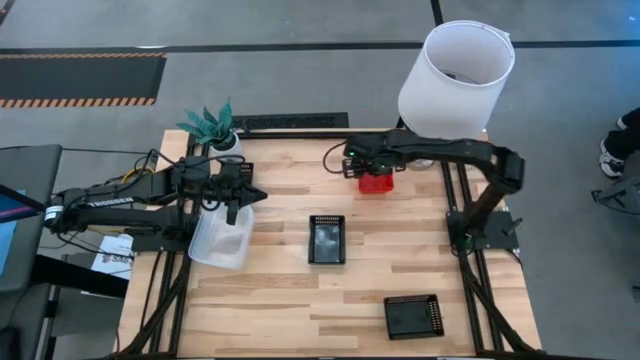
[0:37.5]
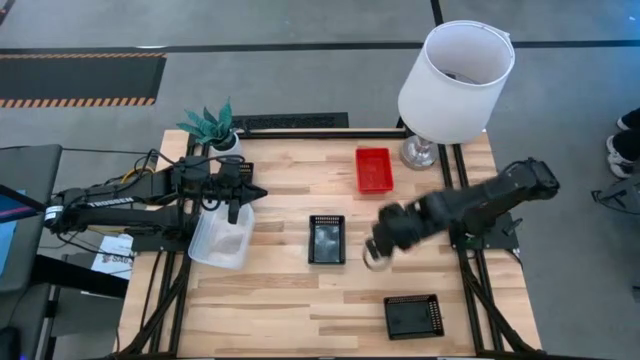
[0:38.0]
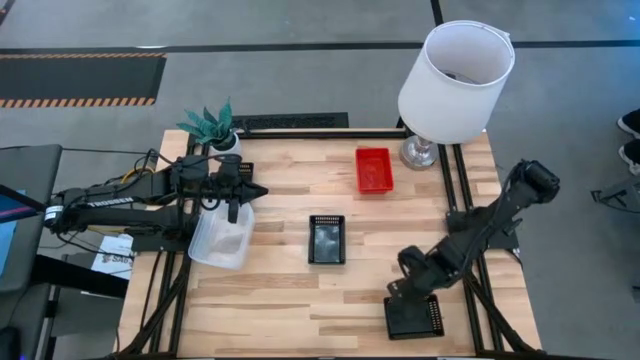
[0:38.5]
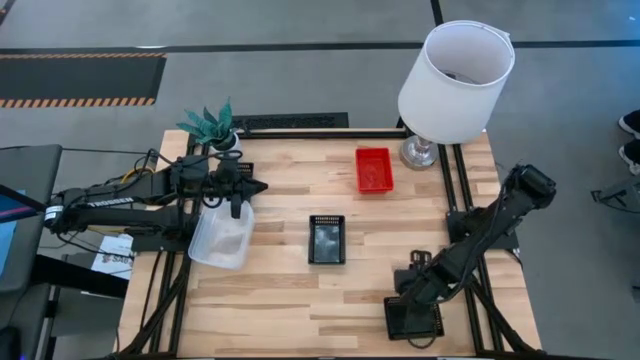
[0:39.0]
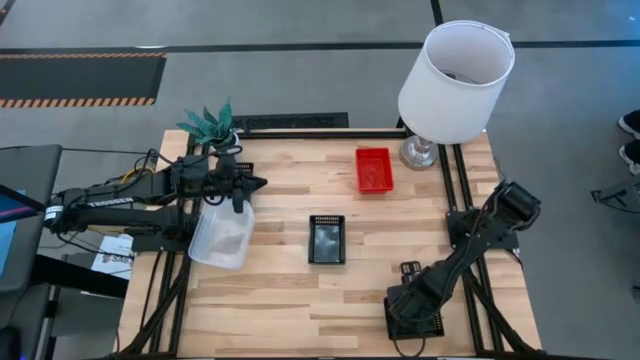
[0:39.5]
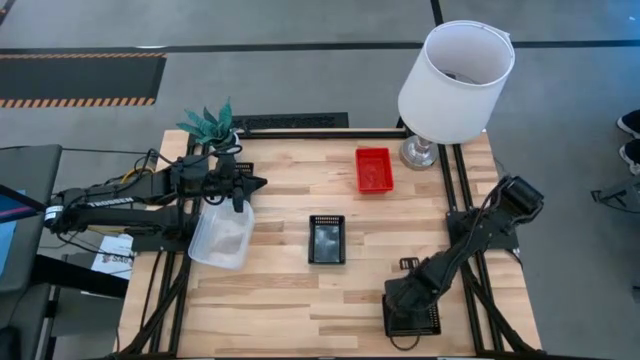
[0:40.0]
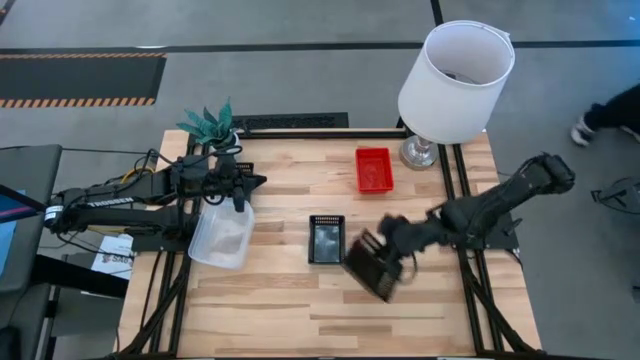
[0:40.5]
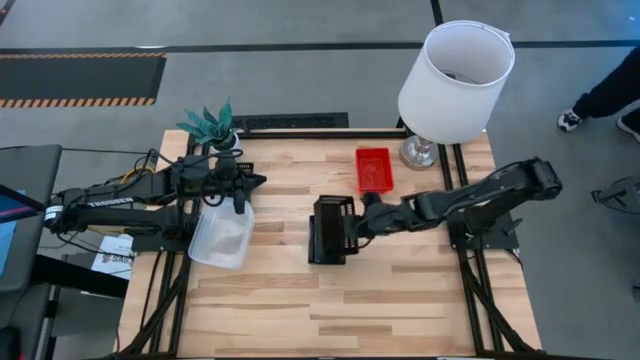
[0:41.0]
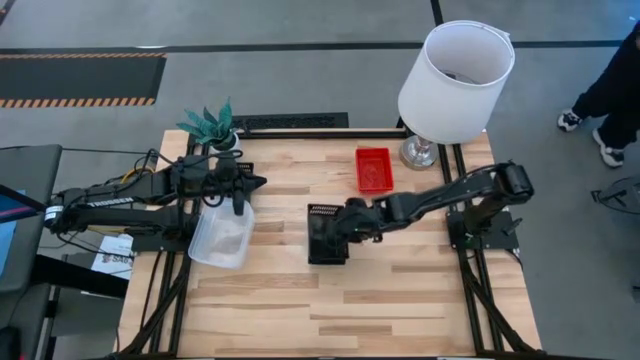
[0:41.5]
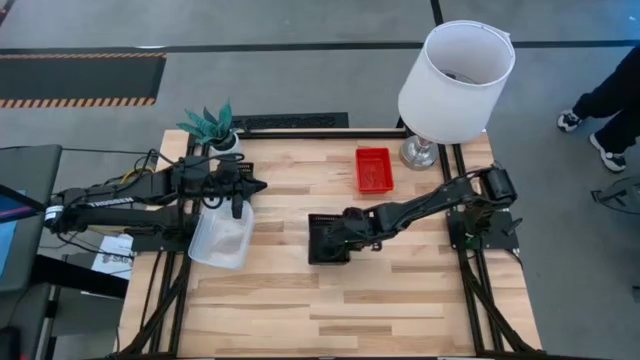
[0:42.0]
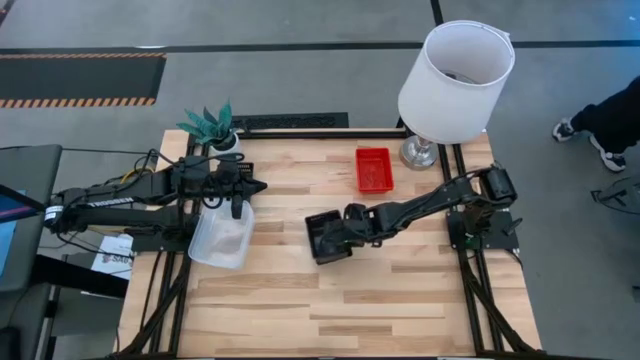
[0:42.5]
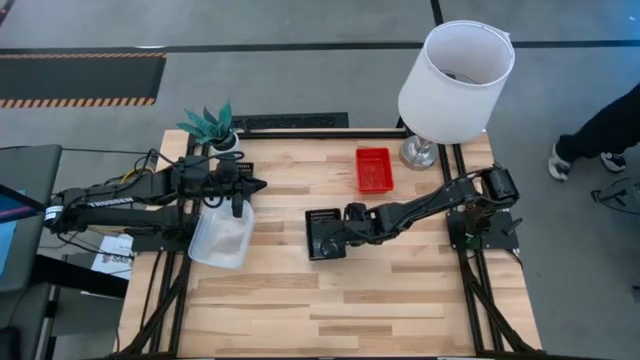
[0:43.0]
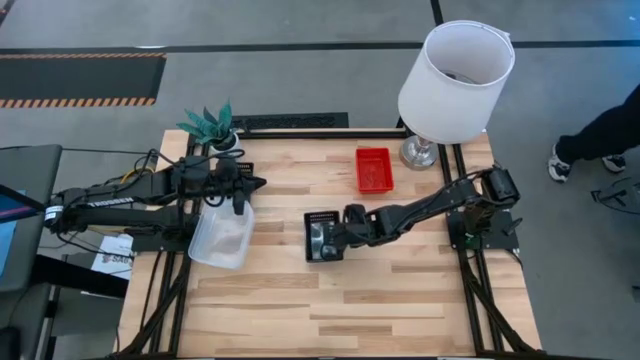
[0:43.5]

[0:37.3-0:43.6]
Stack the bottom black bin on the middle black bin

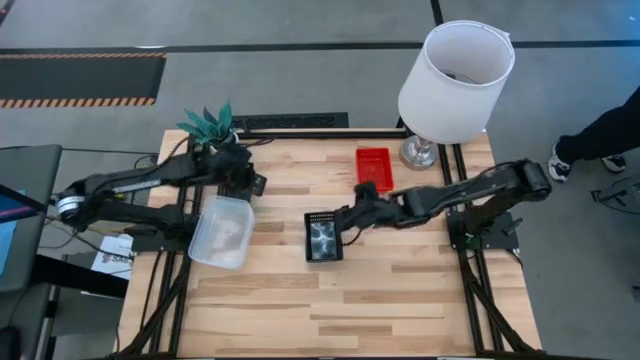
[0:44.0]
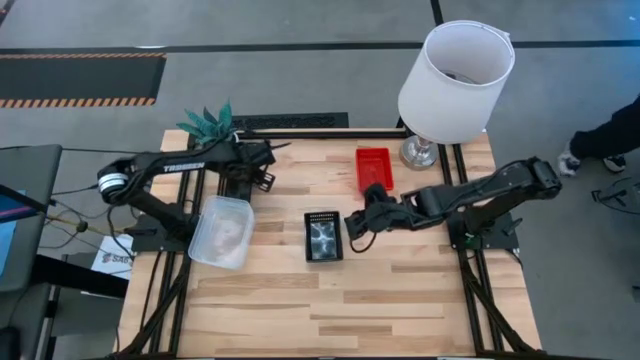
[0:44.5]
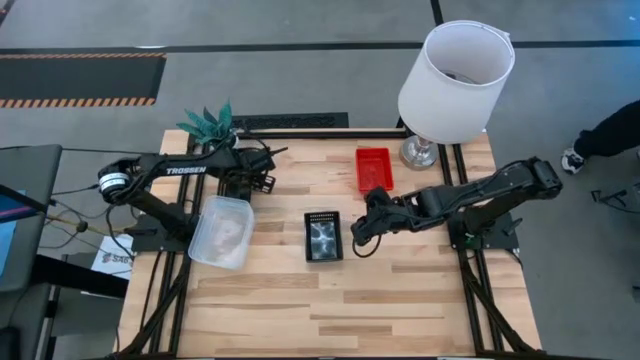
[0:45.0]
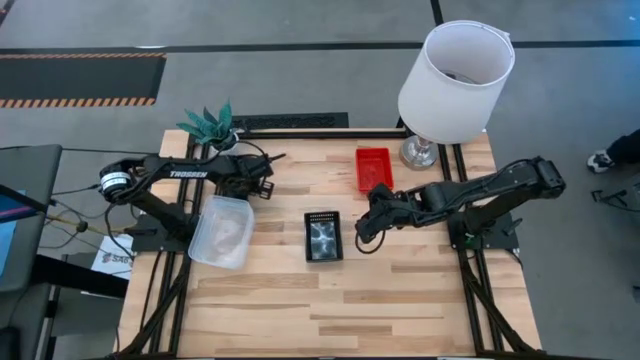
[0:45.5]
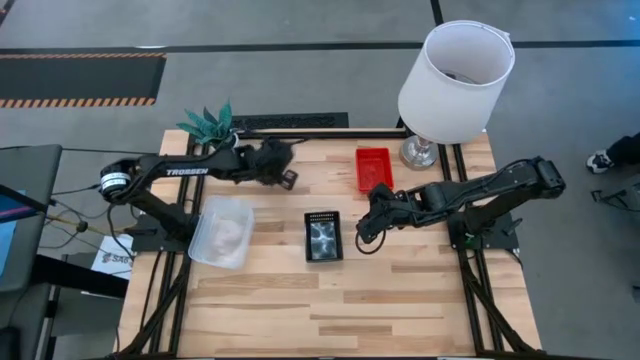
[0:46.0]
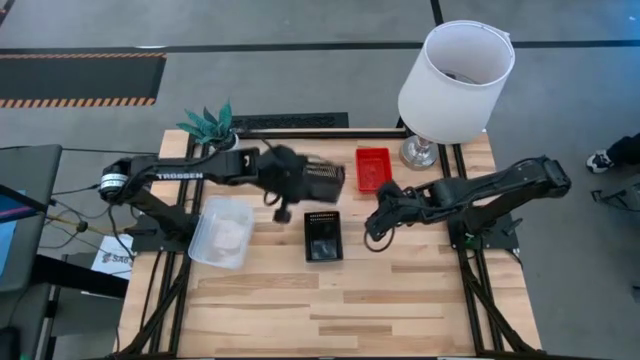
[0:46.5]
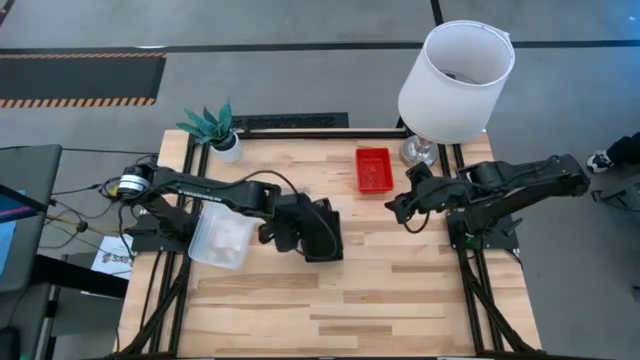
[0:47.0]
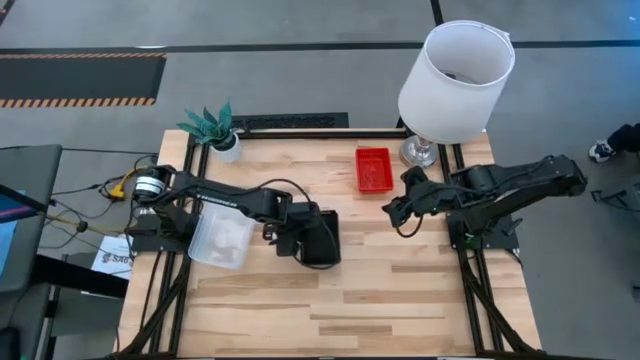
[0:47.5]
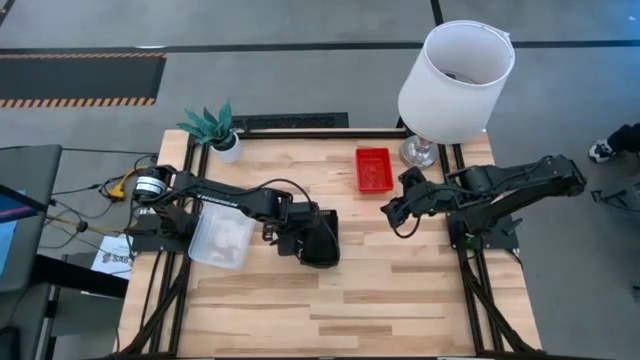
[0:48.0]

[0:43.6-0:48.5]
Stack the top black bin on the bottom black bin

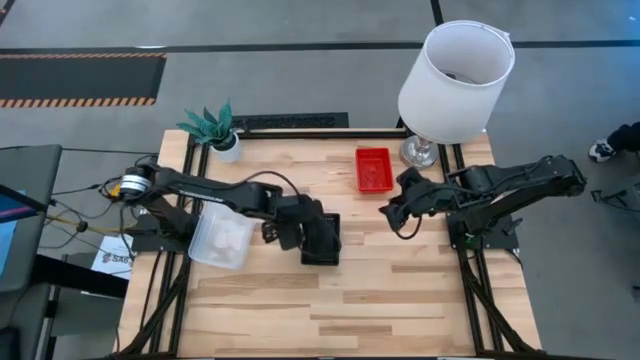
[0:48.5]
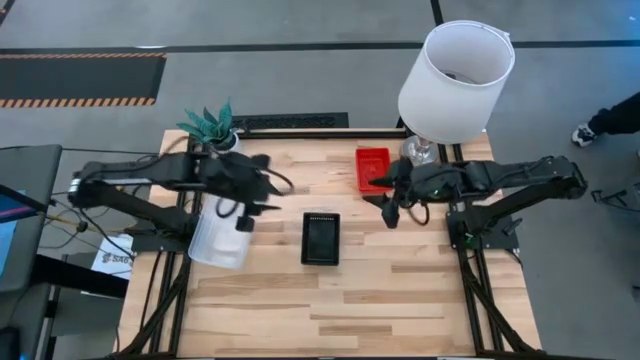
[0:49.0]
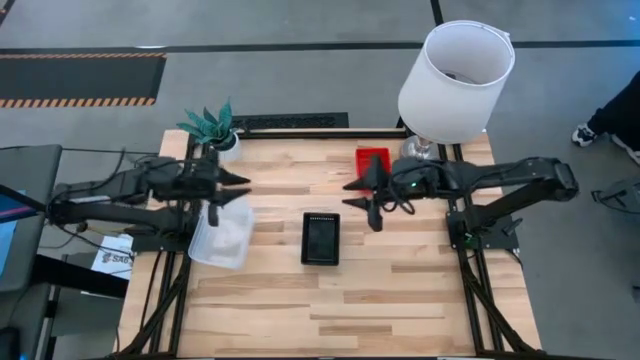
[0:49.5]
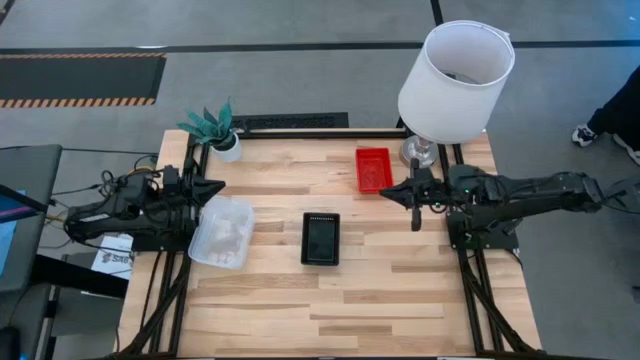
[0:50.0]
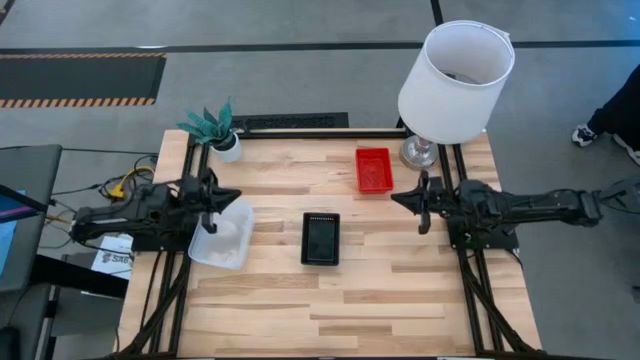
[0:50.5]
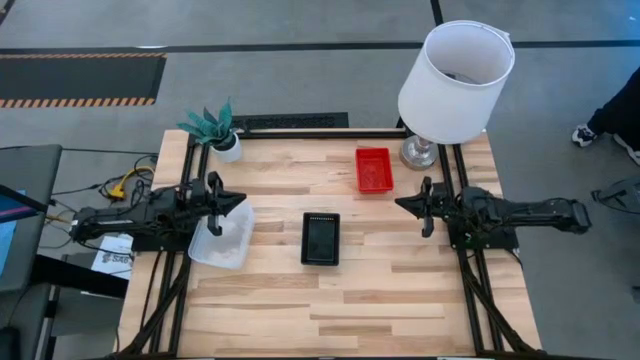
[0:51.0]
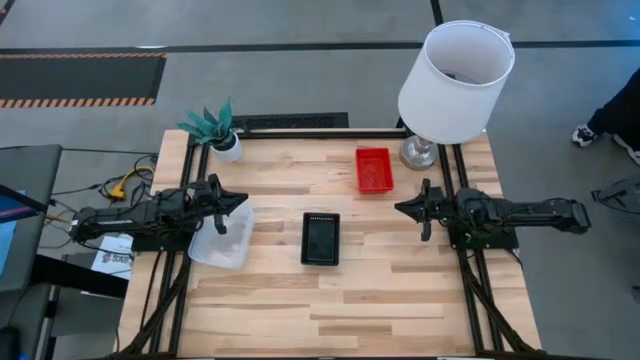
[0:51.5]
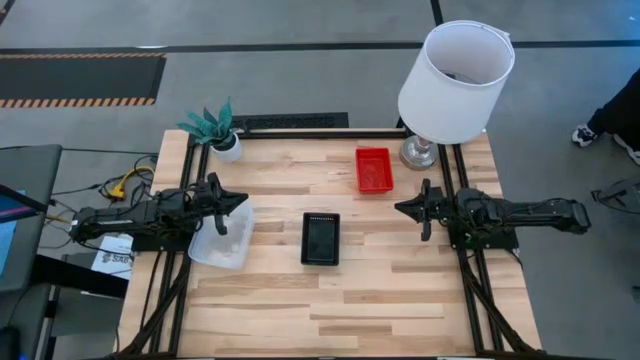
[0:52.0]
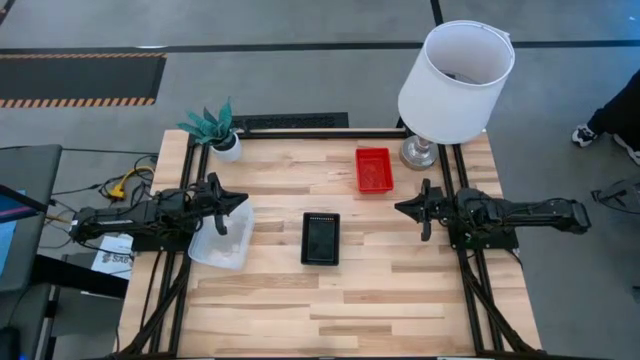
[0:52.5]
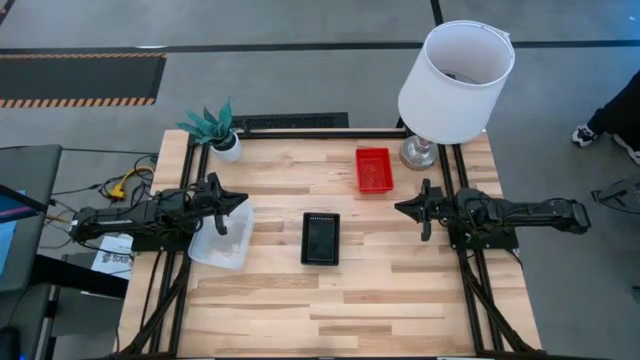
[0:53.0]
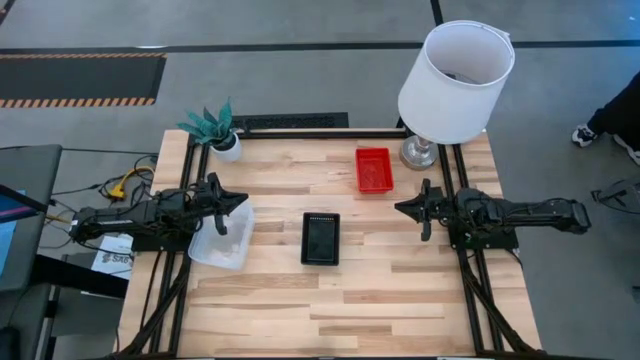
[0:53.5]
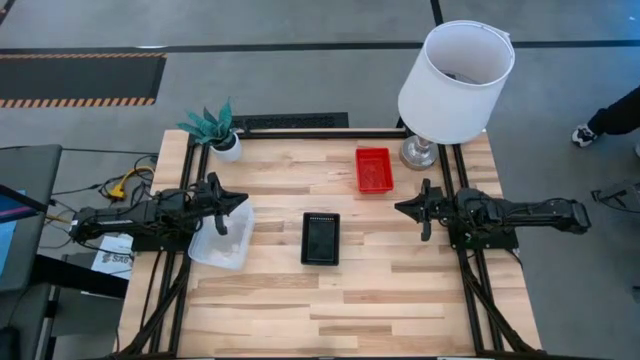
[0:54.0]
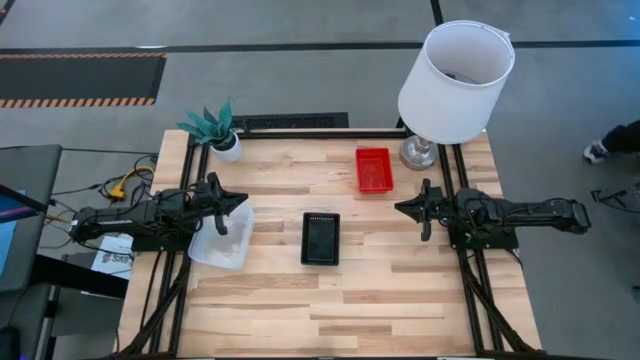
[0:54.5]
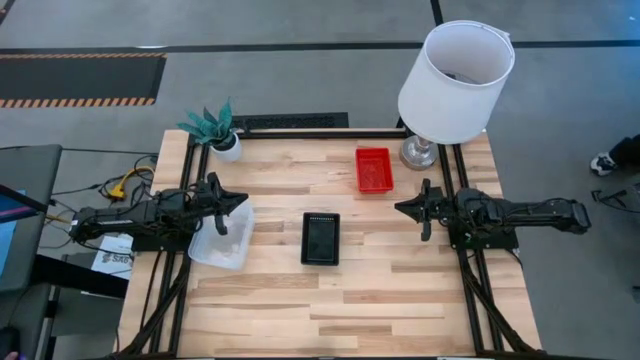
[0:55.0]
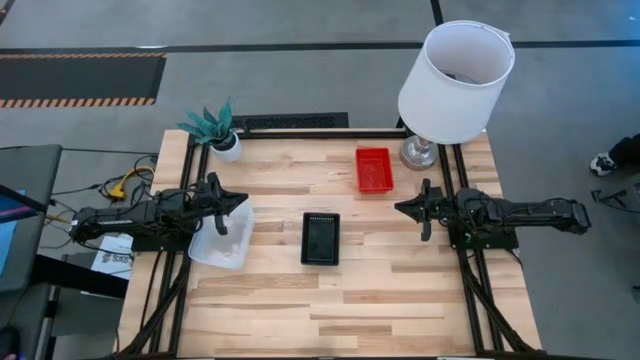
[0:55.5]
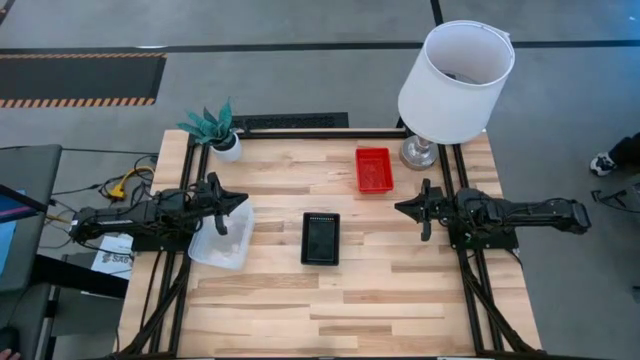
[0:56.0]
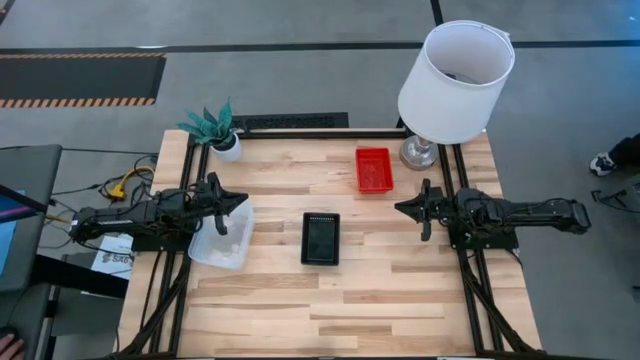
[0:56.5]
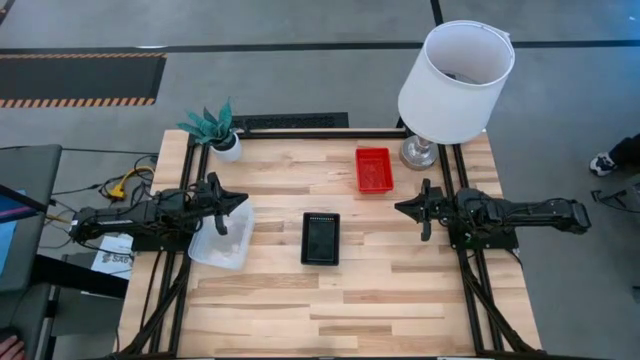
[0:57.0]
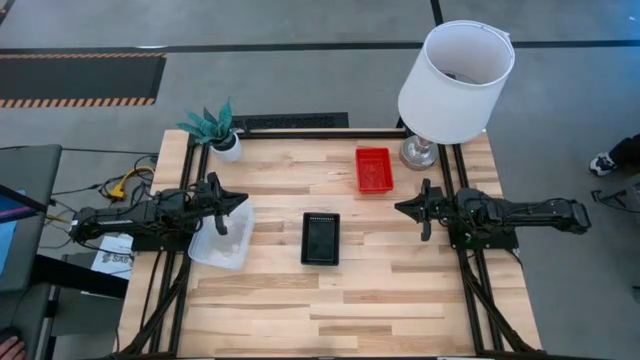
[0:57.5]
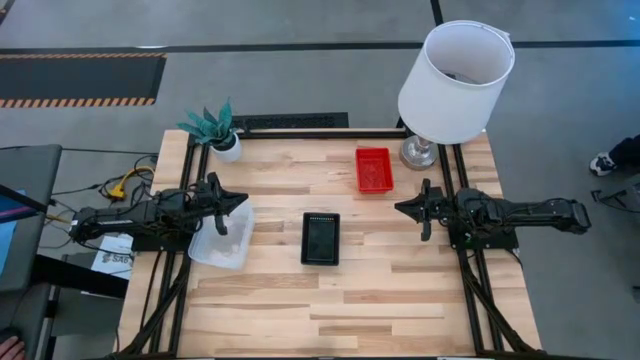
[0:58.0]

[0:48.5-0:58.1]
Return to Home Position
